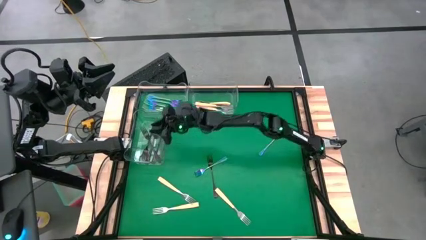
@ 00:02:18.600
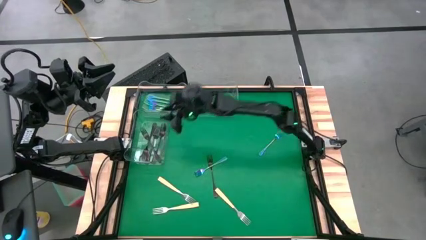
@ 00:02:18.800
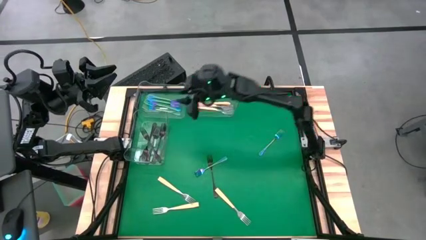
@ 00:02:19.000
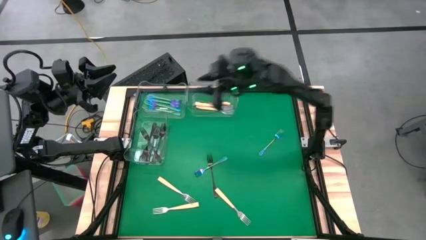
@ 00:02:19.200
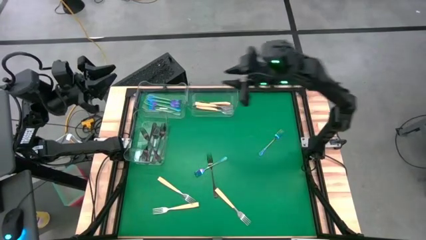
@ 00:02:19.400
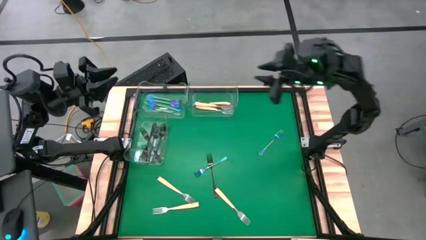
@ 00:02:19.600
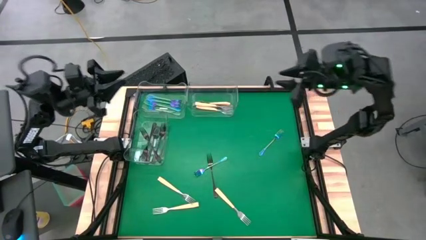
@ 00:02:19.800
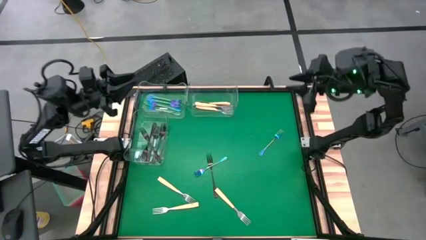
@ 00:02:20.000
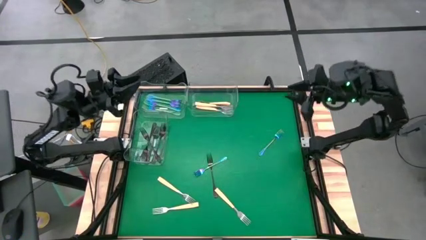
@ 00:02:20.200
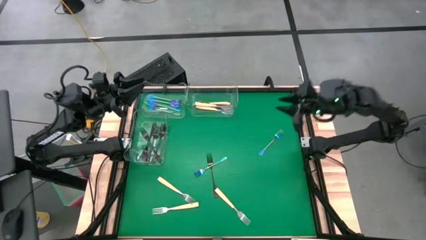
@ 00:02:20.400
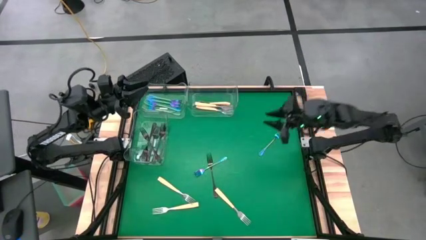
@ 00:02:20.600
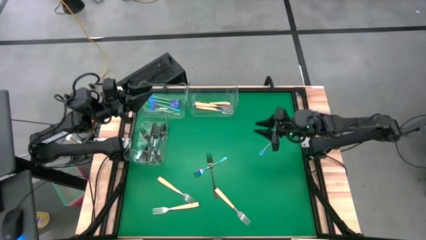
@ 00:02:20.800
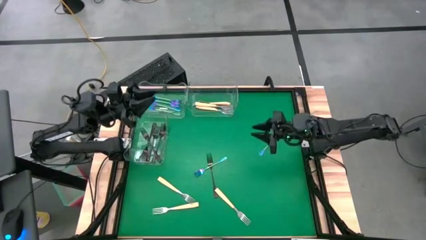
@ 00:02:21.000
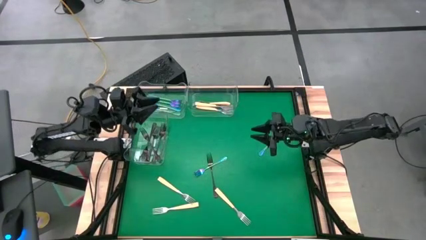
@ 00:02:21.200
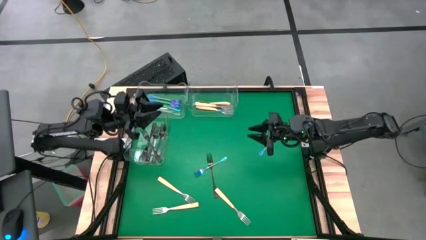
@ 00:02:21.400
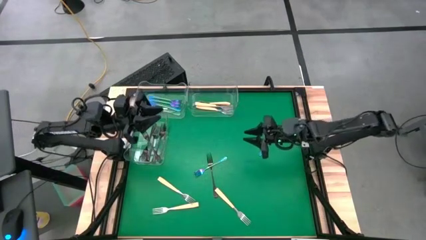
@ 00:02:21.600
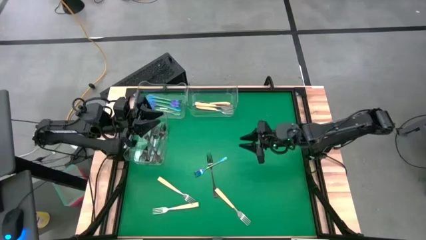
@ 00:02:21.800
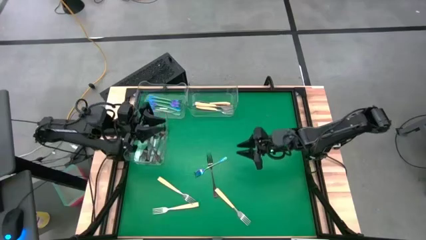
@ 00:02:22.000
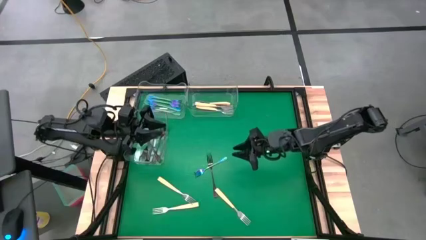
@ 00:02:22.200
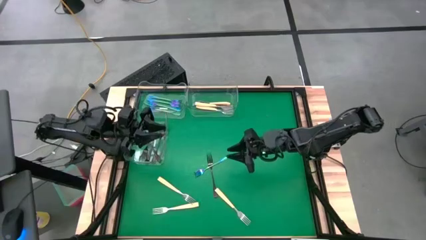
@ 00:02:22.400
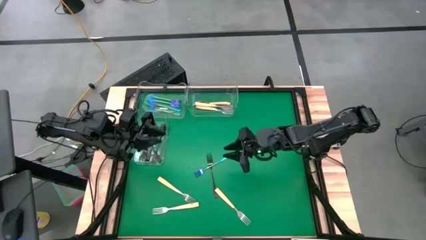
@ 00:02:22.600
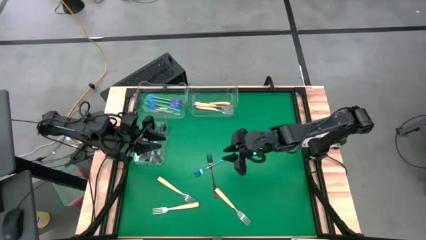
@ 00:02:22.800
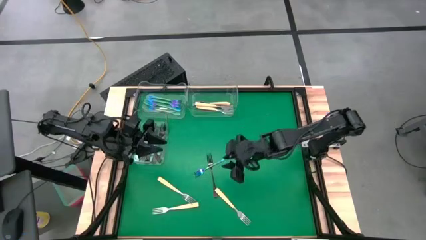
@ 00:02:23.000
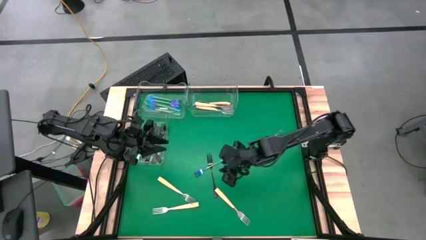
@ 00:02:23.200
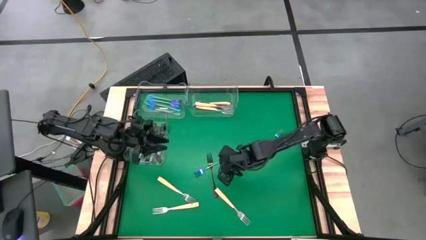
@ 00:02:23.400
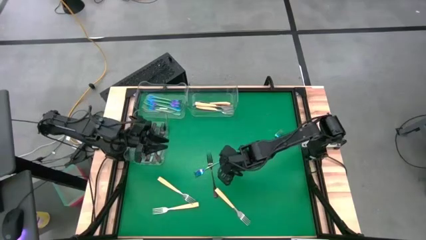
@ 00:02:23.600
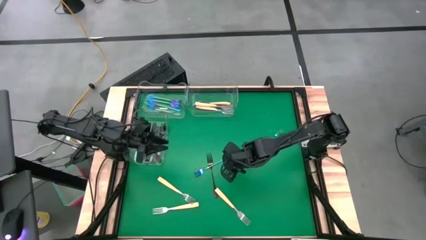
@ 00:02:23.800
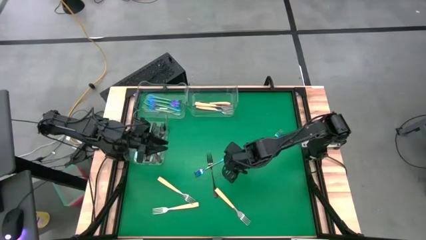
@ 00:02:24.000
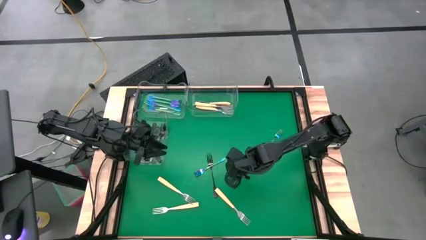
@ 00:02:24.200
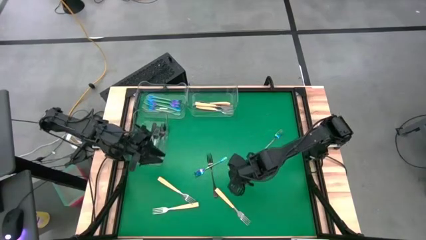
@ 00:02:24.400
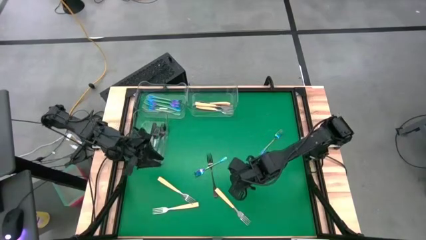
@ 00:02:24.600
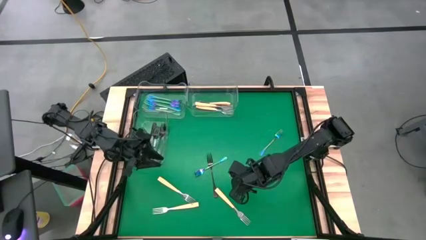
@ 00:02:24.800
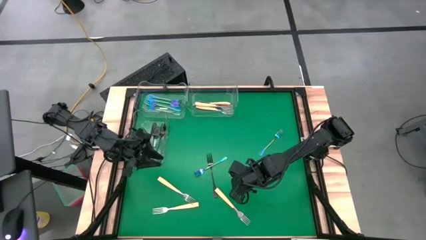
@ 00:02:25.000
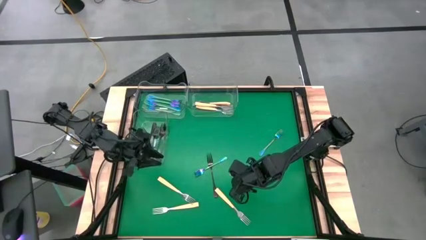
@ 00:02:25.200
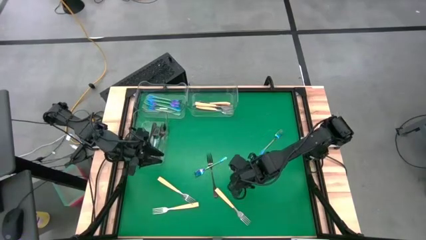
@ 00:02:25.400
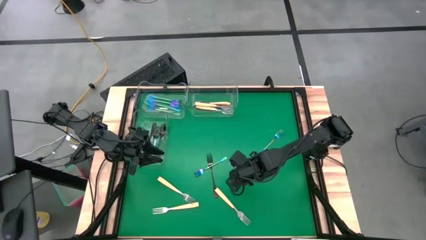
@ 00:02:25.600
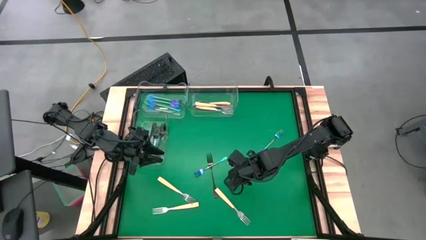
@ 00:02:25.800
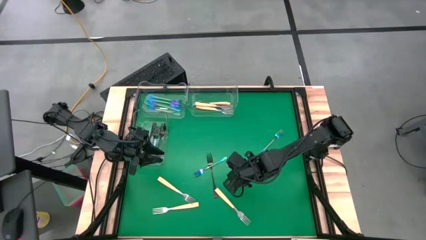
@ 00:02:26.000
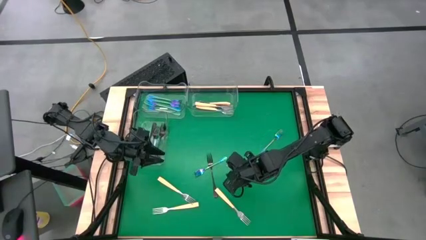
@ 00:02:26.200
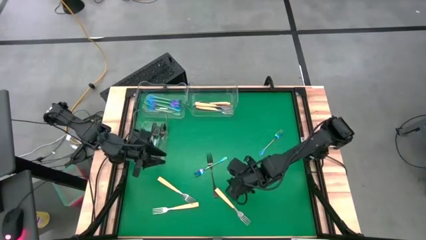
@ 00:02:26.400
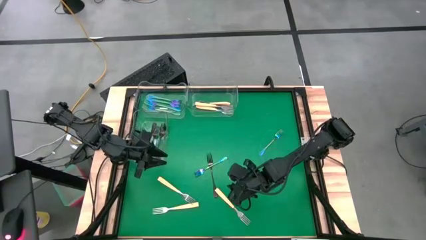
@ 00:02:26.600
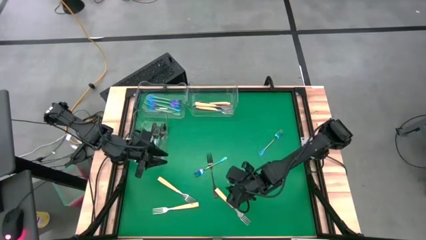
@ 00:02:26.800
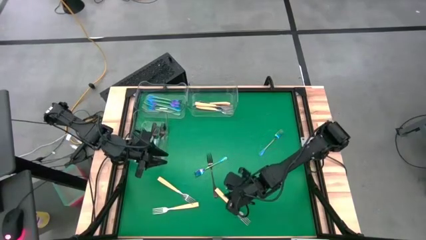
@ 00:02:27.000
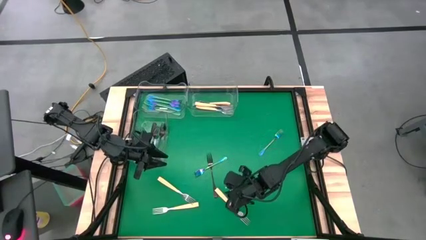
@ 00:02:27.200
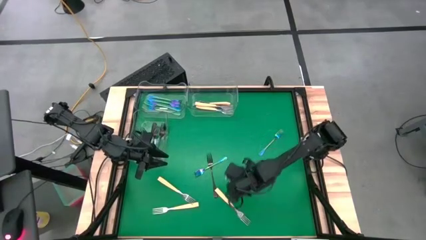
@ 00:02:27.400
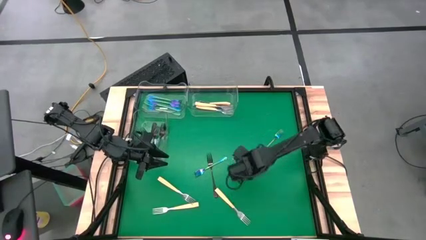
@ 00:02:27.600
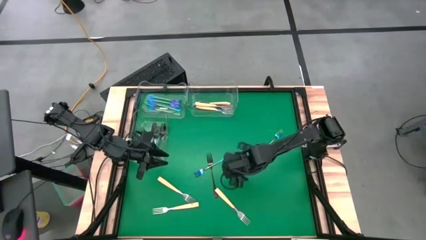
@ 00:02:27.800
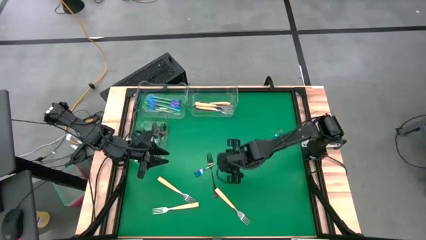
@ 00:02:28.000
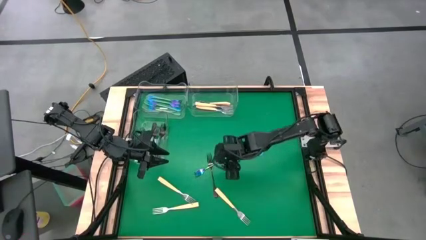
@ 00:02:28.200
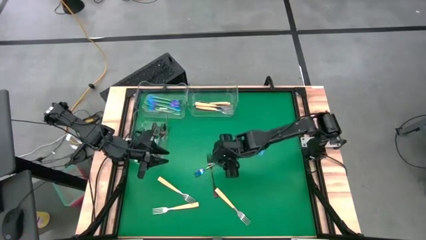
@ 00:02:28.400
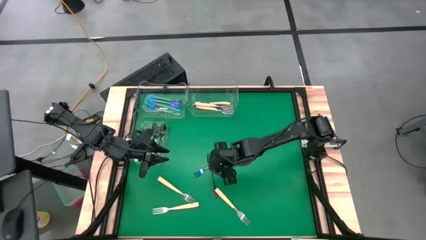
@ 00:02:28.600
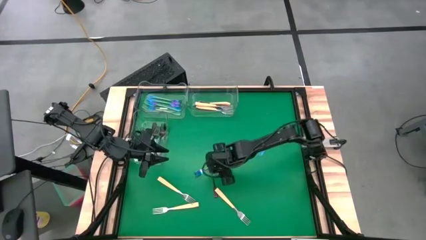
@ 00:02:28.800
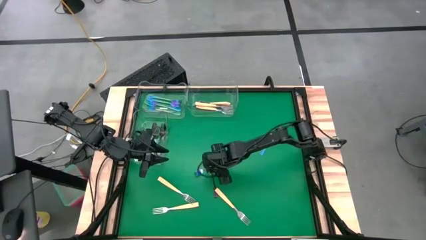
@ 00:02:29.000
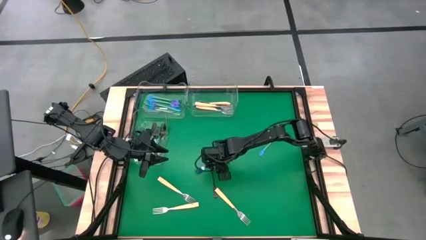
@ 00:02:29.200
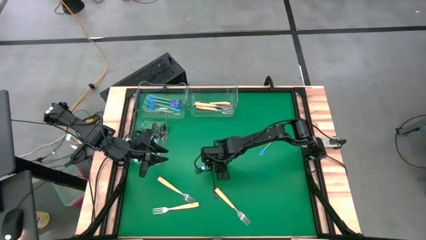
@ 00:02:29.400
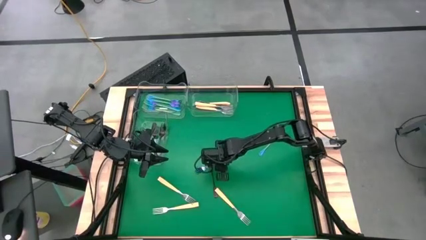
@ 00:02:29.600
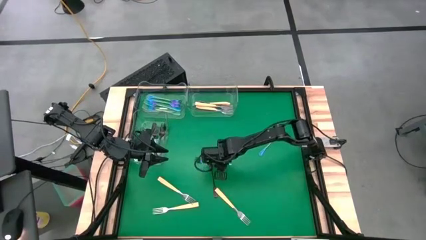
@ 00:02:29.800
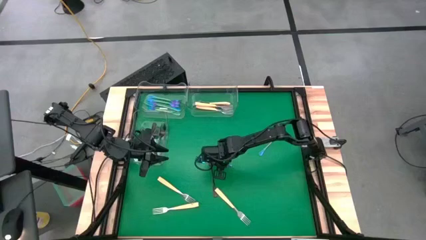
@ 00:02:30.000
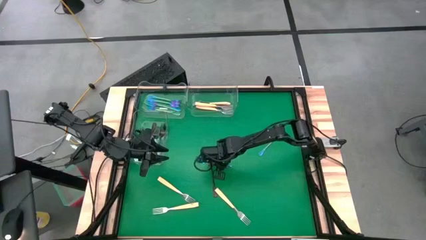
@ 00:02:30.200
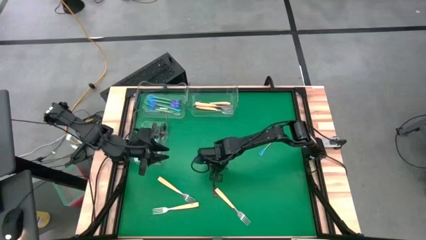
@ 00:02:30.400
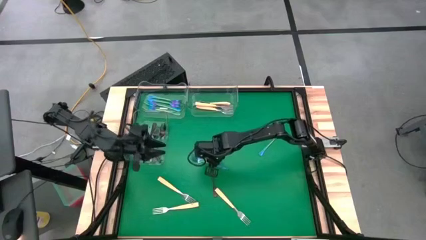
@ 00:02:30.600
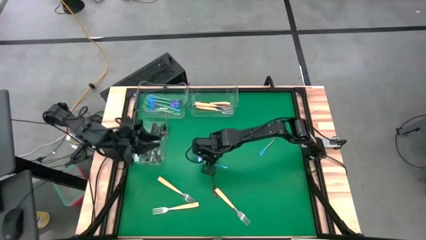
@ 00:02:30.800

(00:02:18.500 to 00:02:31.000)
Task: Sort silverware by color (type)
Put the iridescent fork into the top left transparent bin

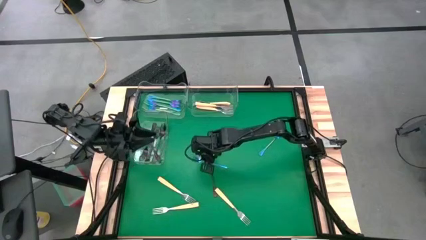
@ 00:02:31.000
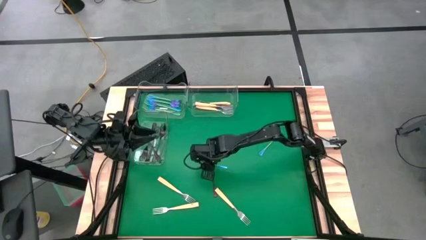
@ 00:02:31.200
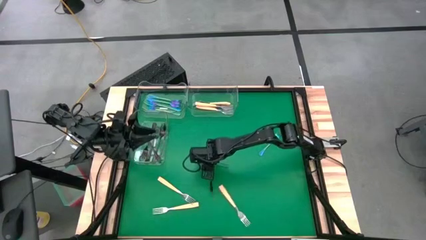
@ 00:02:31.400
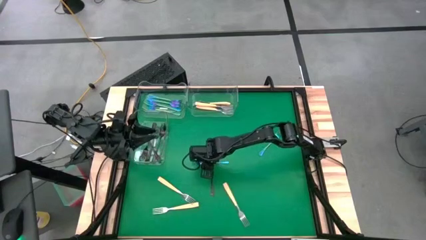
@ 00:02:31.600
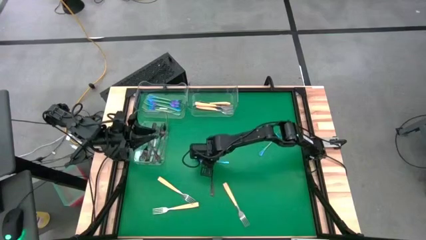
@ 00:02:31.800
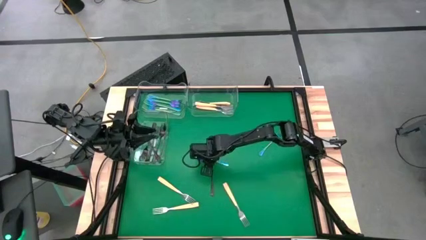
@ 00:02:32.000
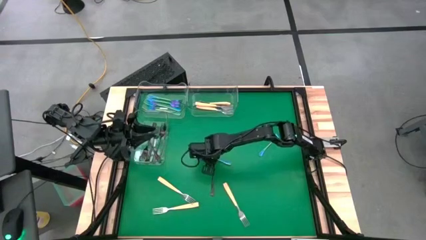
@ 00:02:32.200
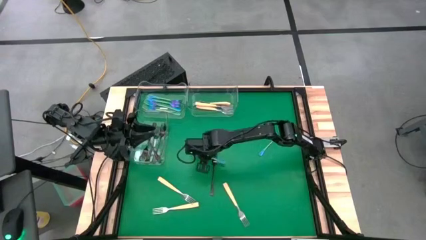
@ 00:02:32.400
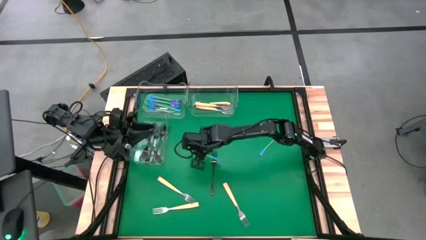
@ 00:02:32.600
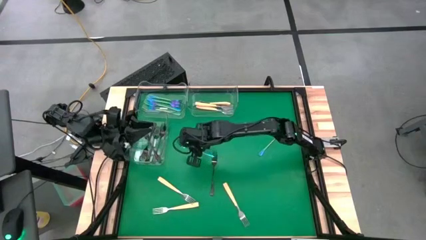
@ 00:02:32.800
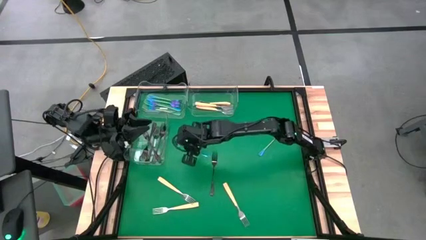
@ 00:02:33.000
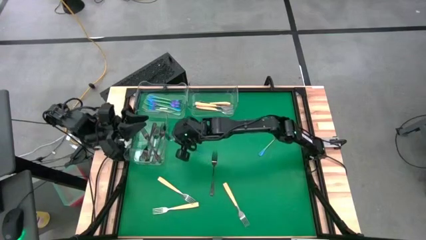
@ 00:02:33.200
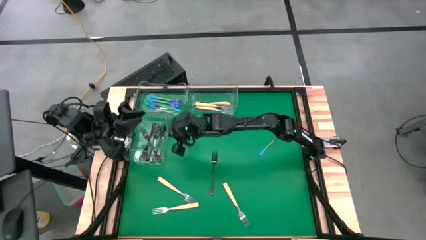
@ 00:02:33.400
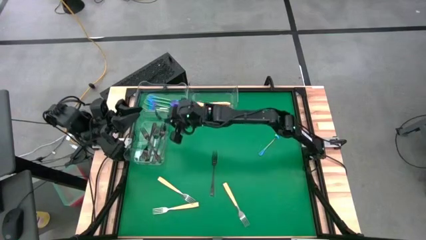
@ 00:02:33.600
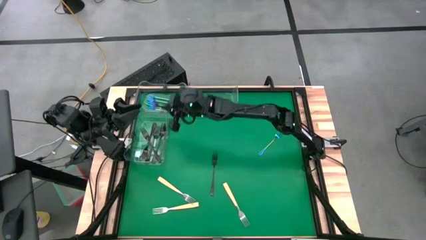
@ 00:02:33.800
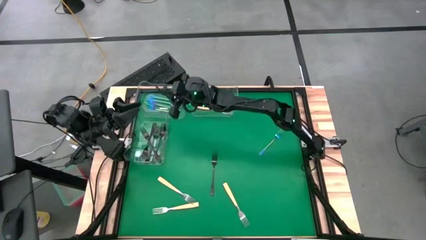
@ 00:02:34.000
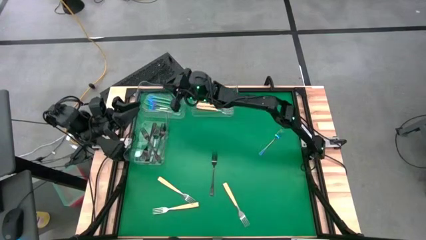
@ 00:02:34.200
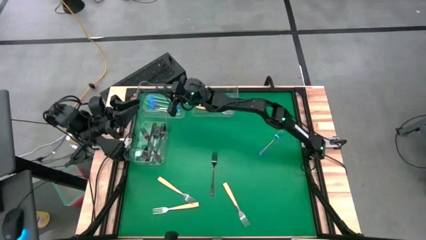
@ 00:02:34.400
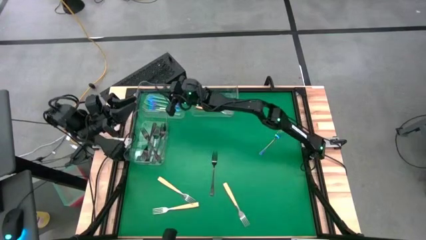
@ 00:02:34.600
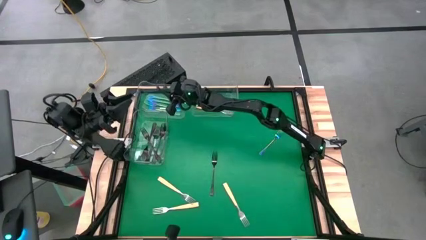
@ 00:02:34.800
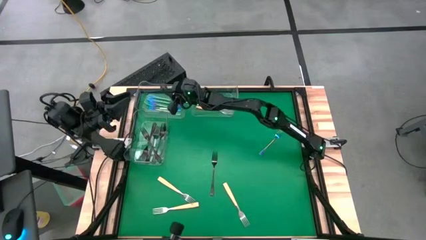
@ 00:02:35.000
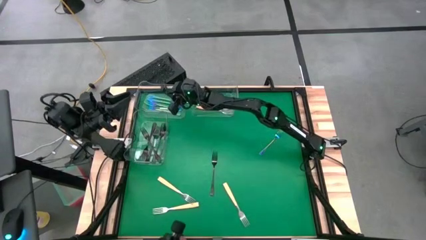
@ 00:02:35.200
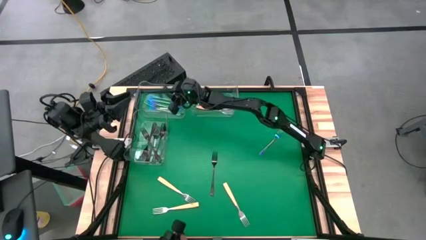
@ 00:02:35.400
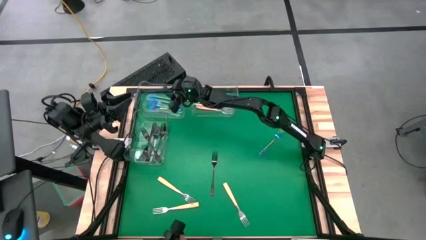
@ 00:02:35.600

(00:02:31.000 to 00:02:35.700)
Put the iridescent fork into the top left transparent bin
